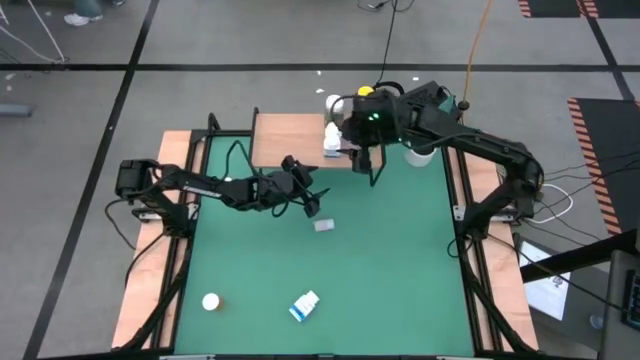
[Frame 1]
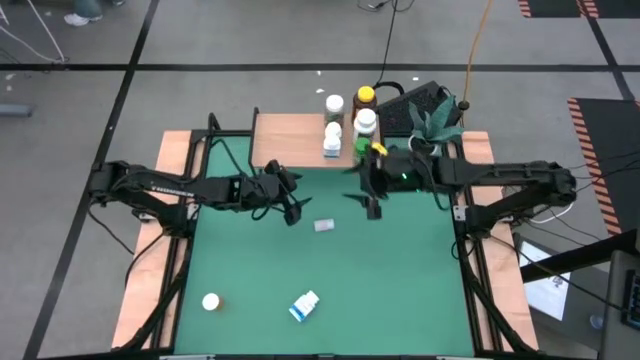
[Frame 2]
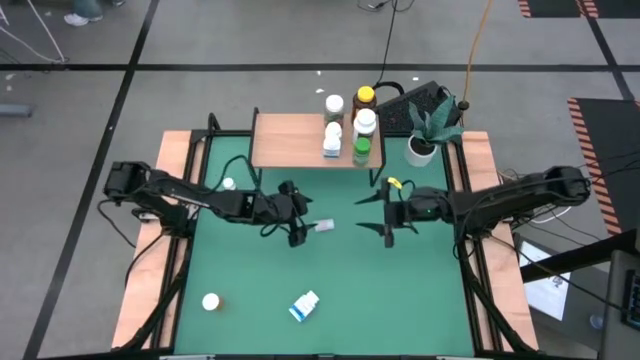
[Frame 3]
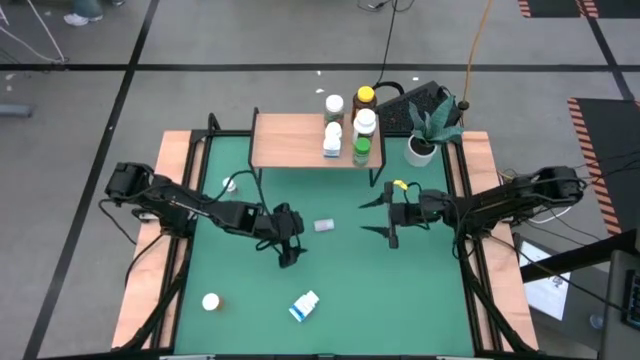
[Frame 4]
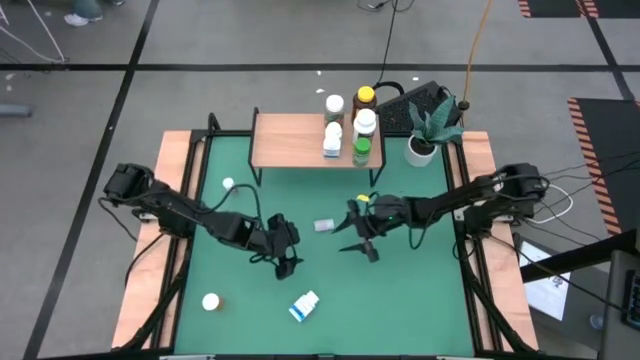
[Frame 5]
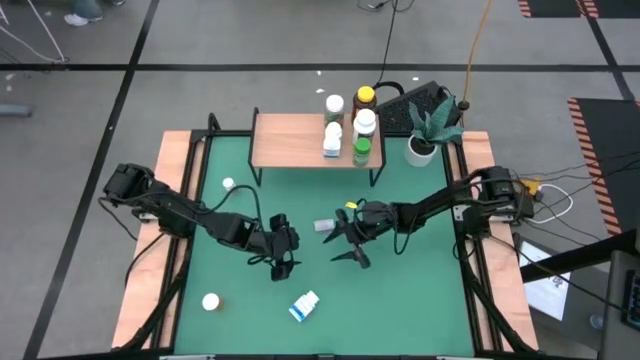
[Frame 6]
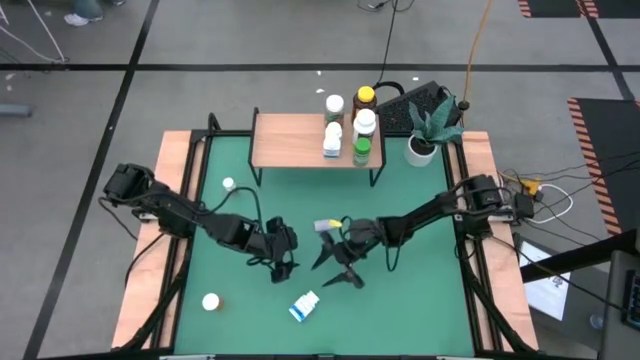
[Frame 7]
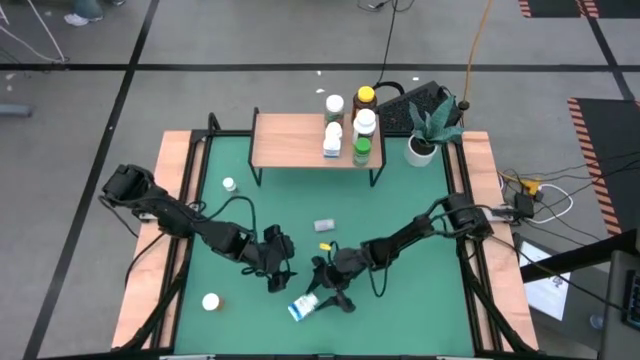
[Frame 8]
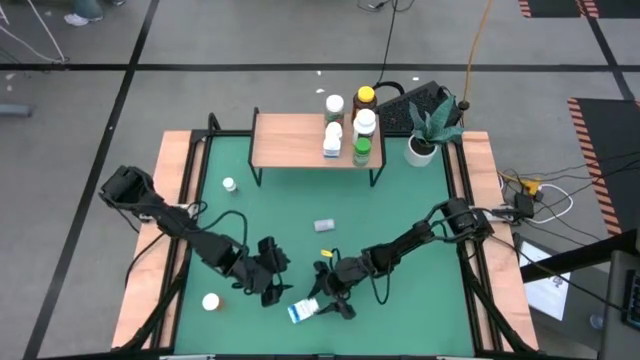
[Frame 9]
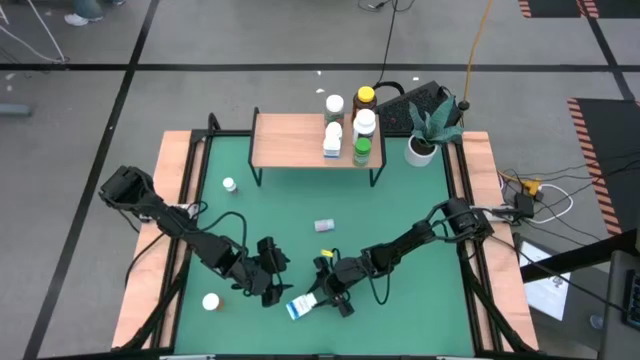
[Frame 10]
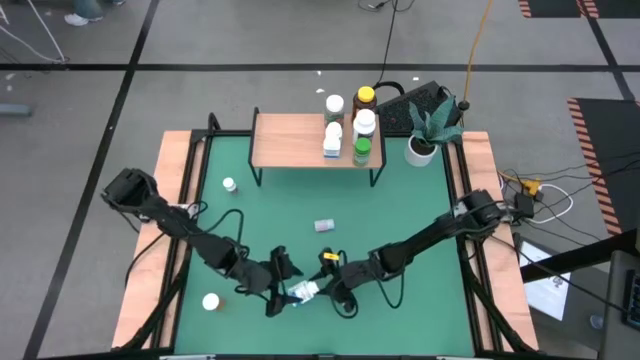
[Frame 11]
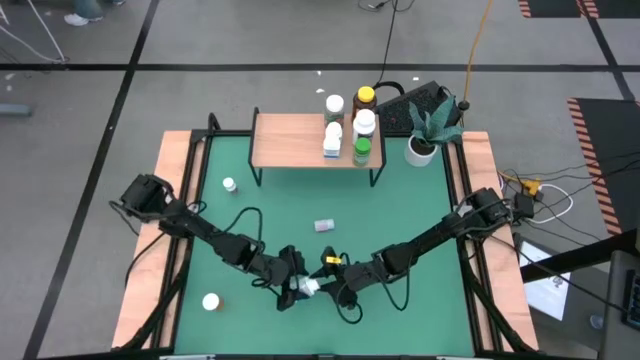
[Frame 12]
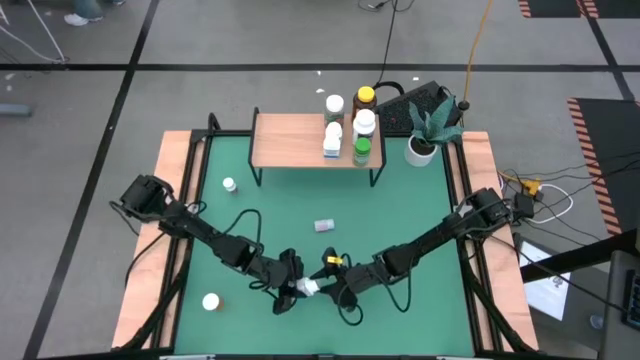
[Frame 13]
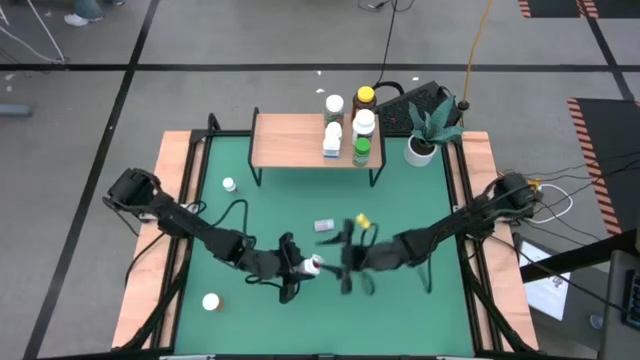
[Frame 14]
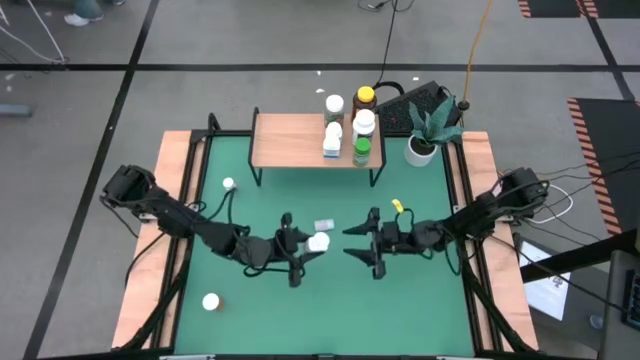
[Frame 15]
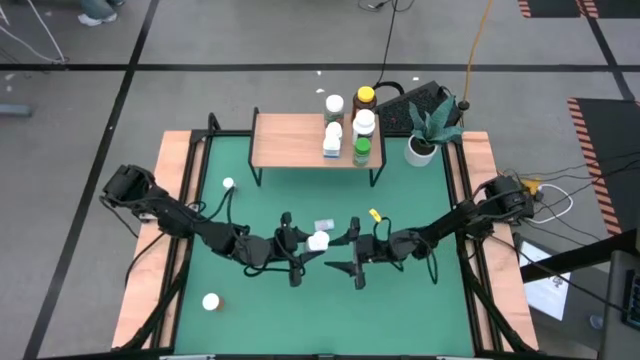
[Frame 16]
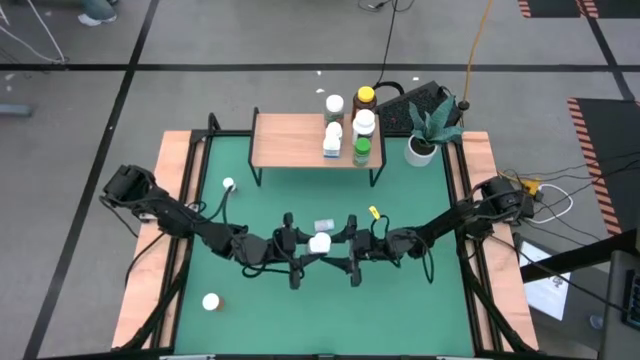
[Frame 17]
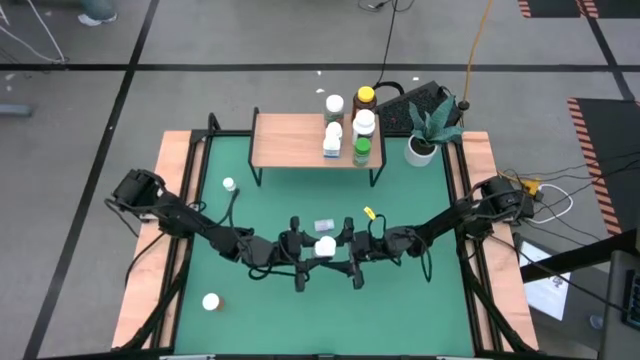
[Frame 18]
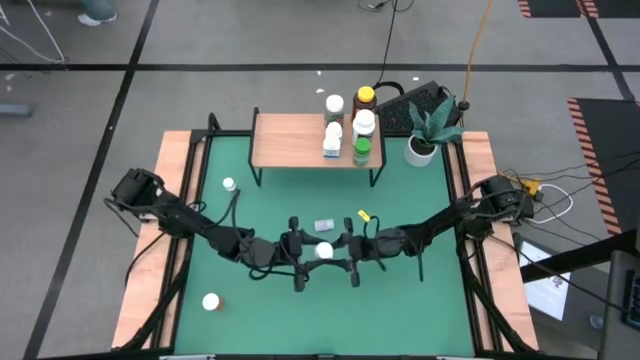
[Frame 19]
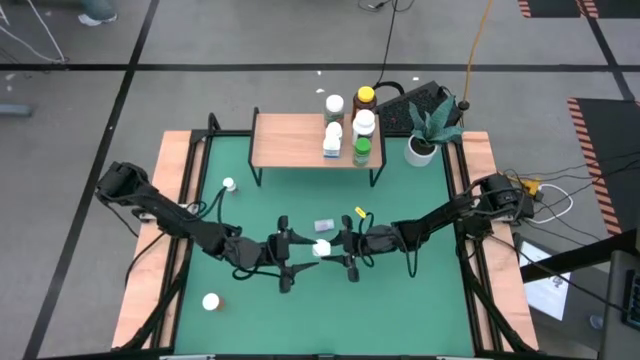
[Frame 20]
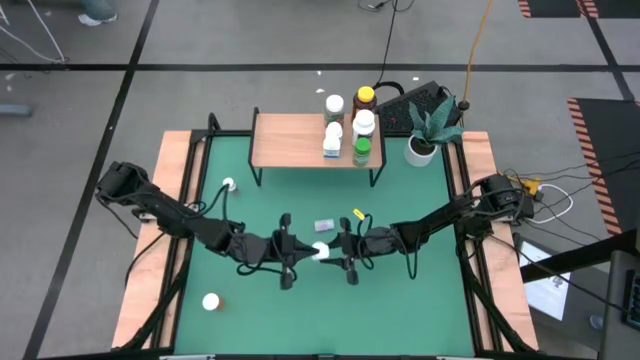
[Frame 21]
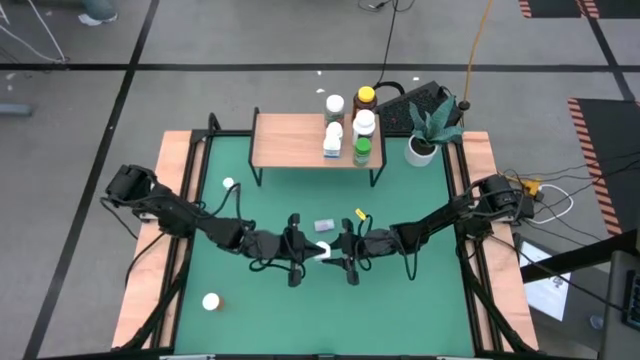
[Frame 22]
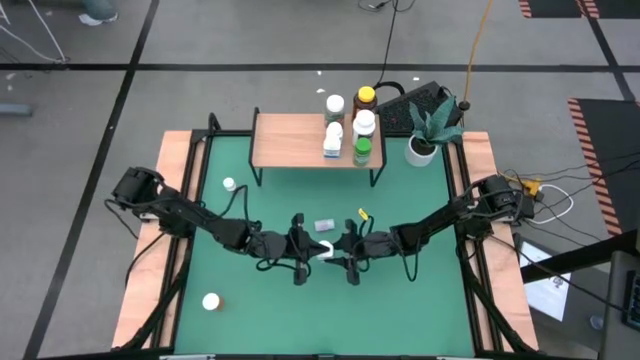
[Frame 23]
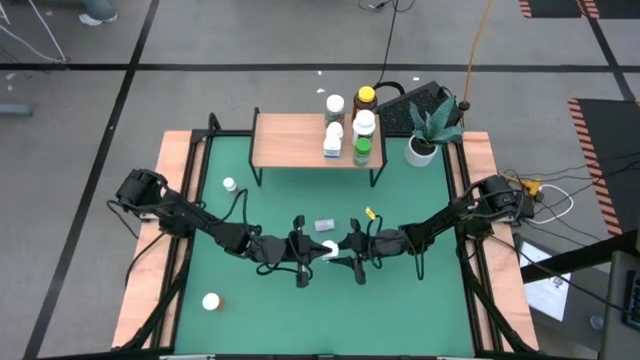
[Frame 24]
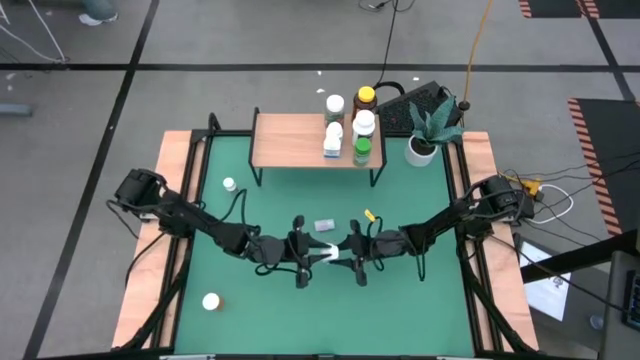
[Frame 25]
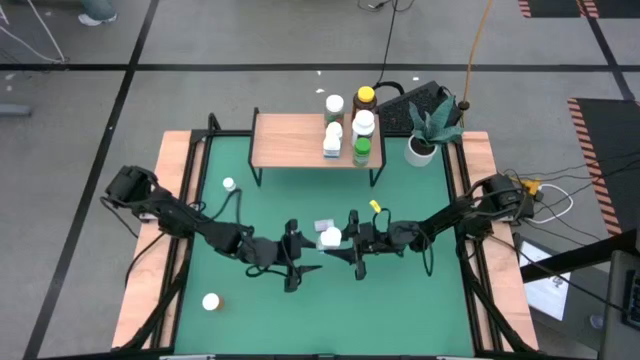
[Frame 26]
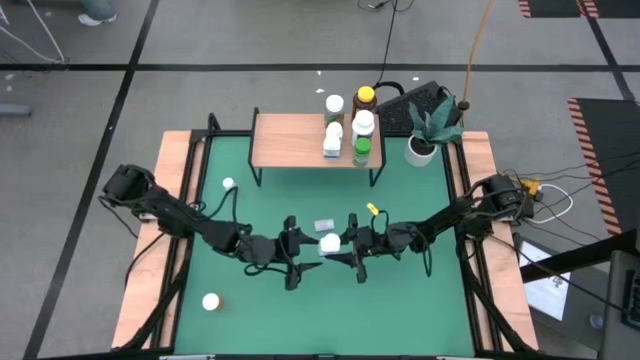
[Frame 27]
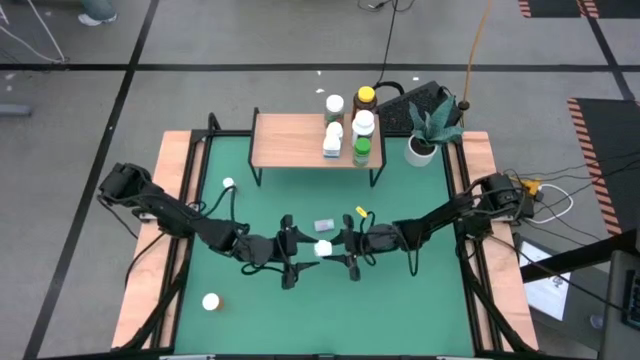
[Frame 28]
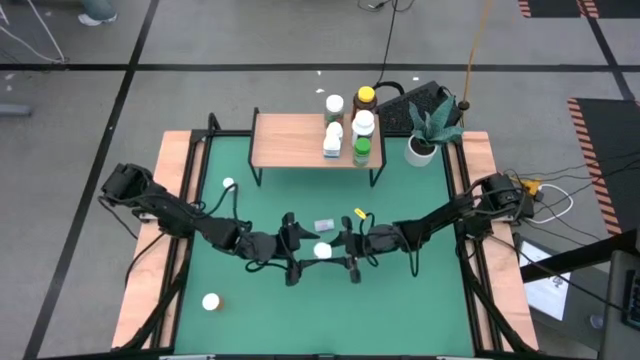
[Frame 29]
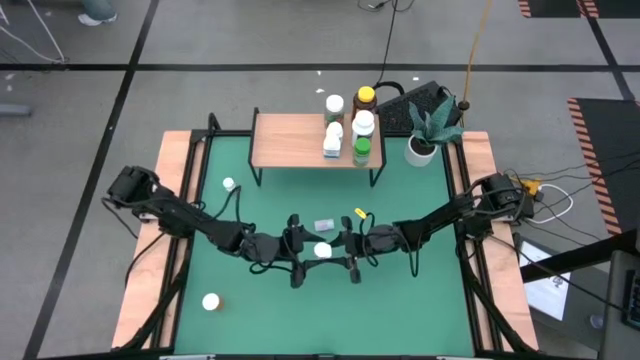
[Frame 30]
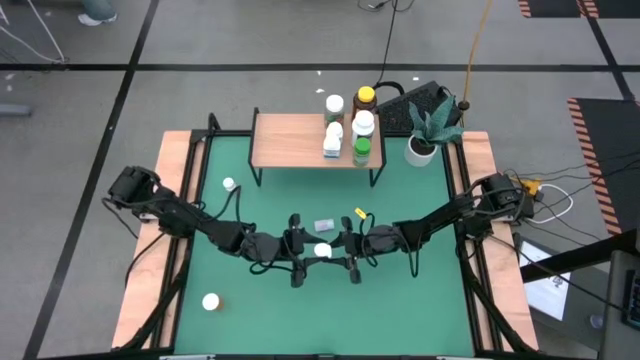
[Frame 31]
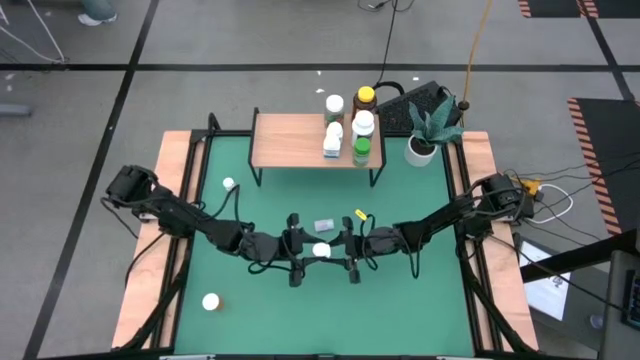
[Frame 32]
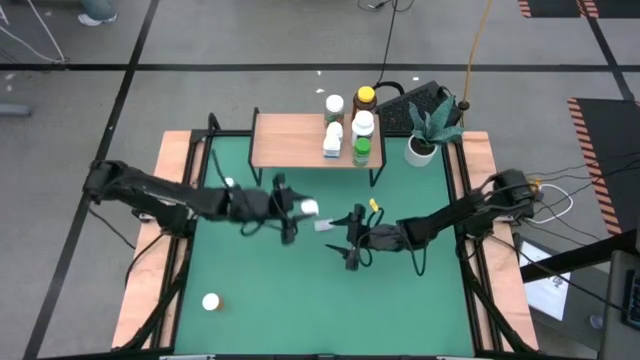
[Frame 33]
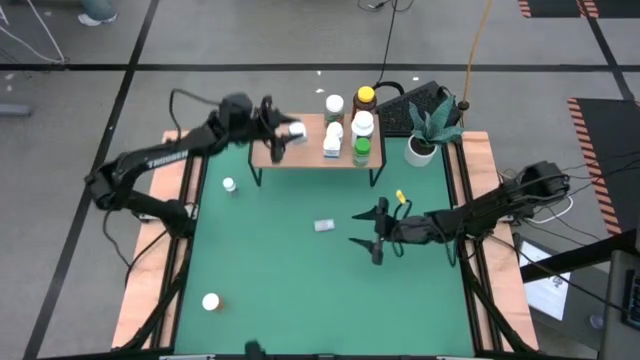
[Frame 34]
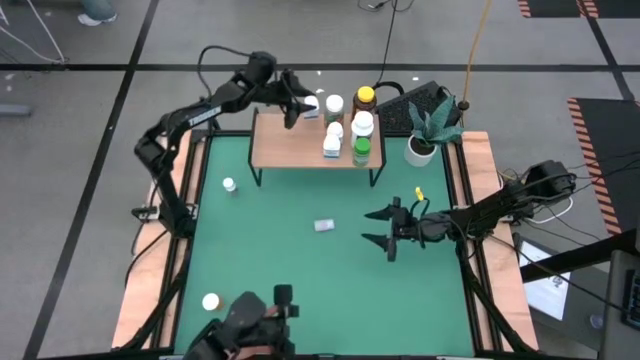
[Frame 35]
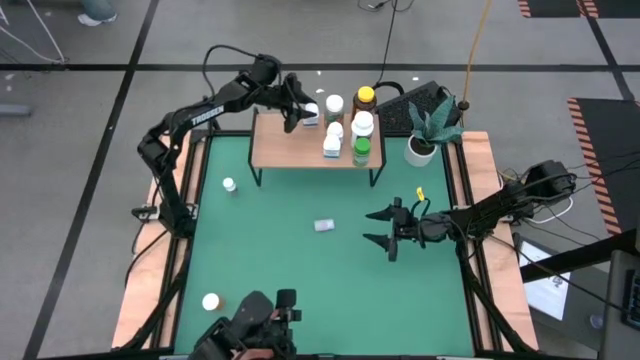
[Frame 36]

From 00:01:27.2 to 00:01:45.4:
Task: Pick and place medicine bottles onto shelf by color
Put the blue white medicine bottle on the shelf
